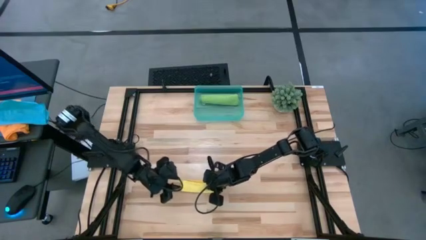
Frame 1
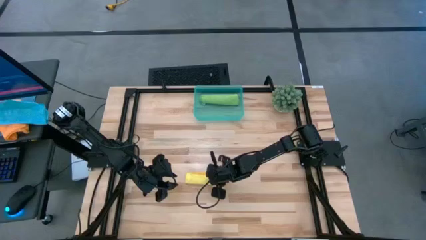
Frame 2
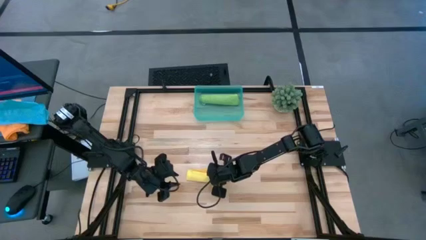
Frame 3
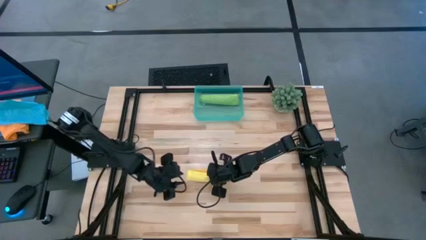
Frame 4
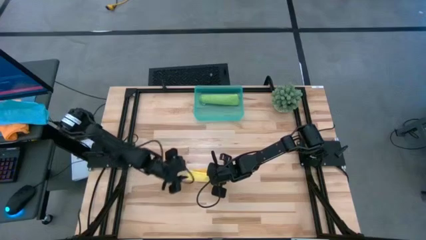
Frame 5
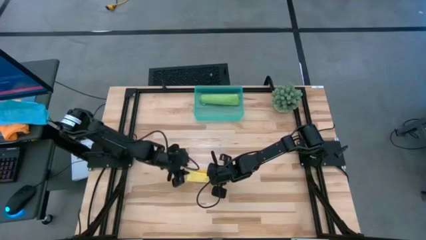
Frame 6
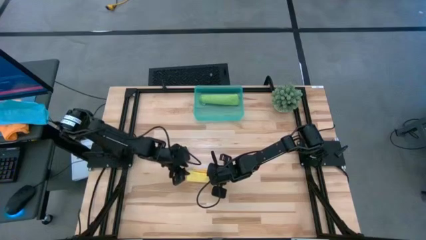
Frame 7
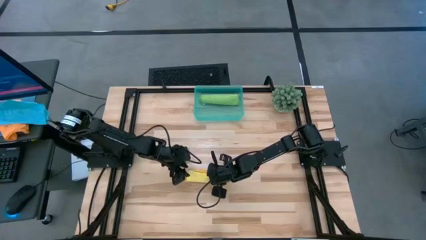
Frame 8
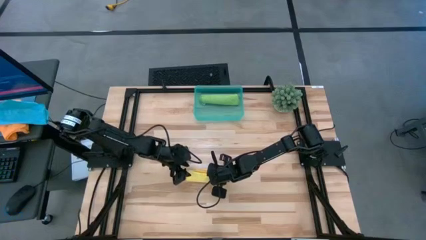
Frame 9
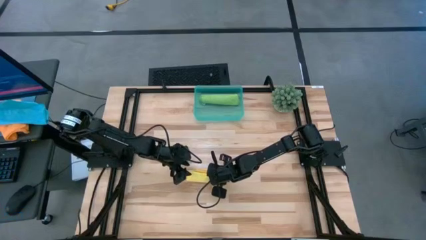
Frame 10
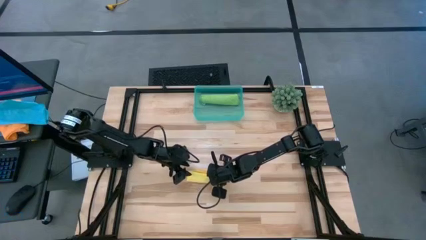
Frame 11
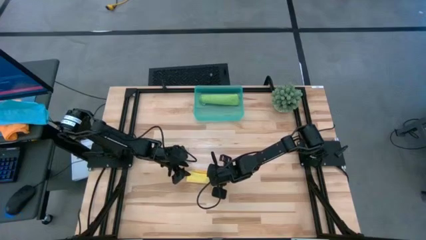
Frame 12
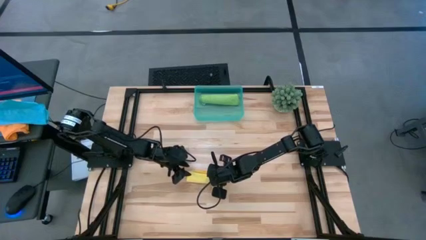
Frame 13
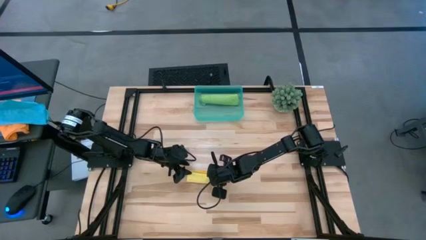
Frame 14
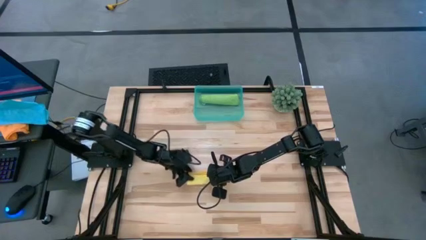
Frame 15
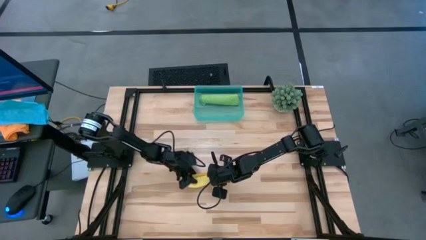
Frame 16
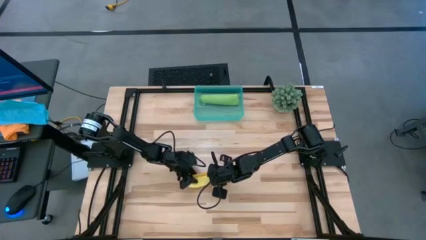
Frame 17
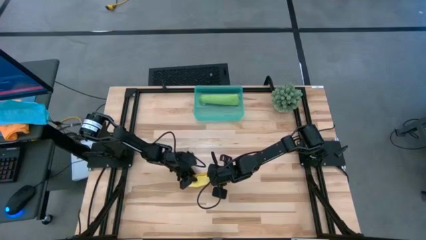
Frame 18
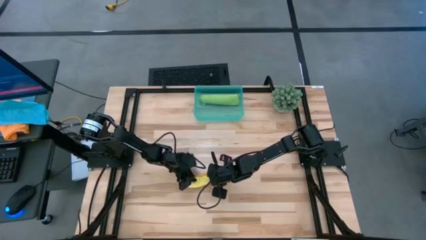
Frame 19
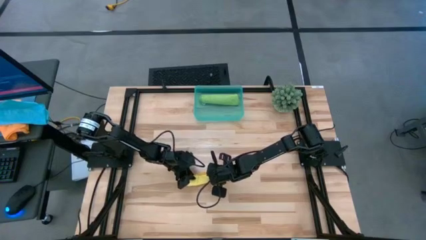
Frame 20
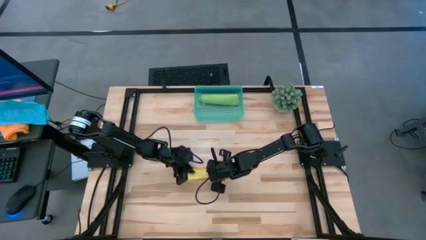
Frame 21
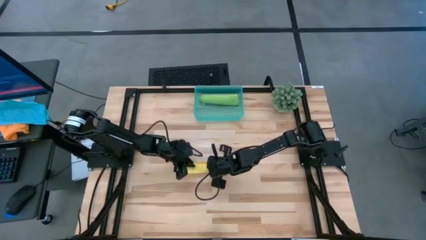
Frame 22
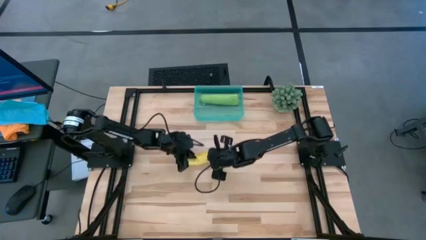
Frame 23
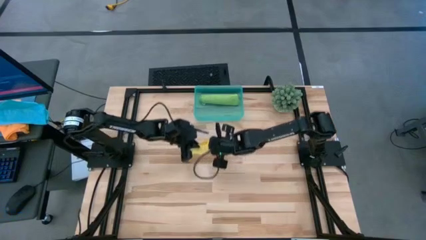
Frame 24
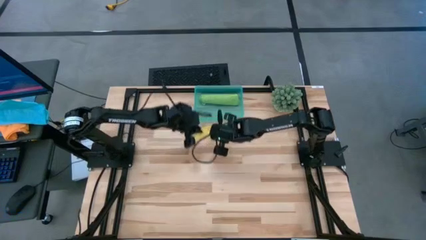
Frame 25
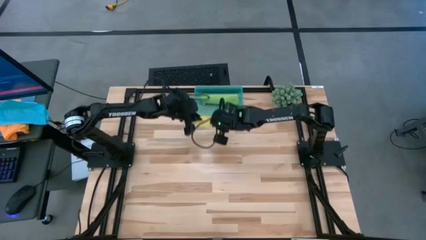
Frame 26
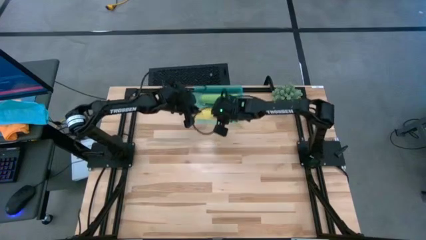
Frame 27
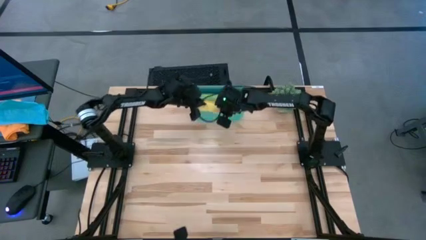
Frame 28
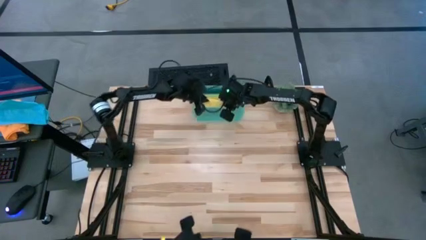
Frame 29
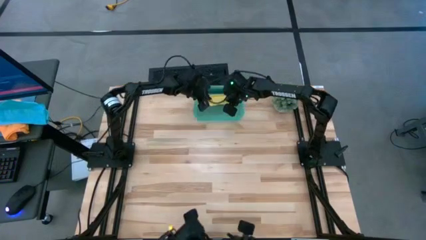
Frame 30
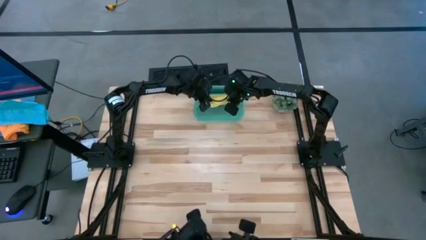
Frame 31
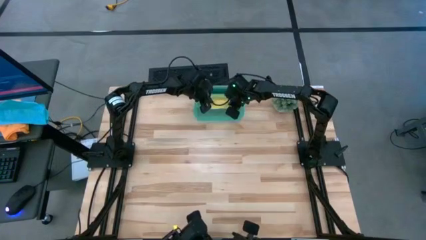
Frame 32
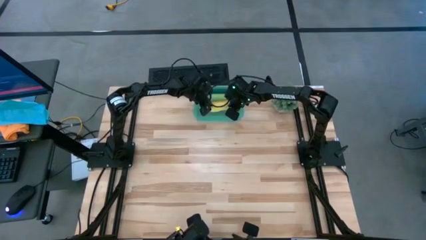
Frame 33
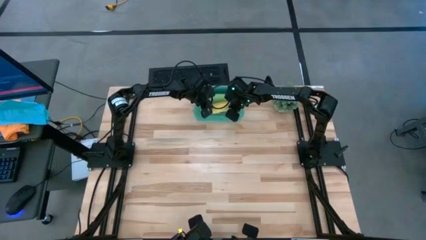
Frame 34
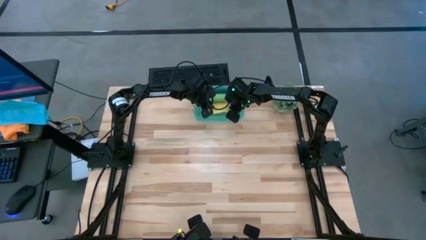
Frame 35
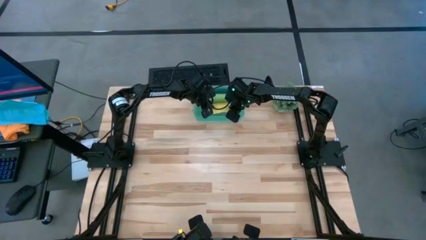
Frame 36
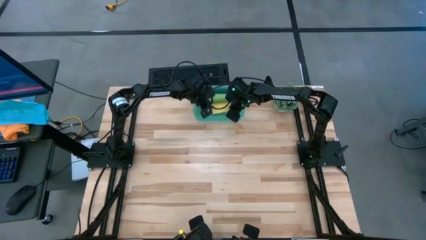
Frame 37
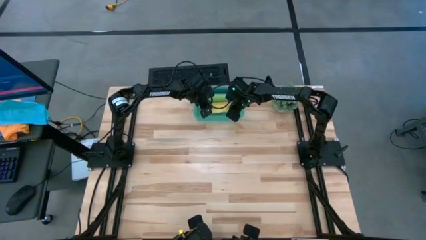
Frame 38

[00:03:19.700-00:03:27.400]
Task: Roll microfiber towels into tight, uniform cylinder then place into a basket
Put the yellow towel into the bin

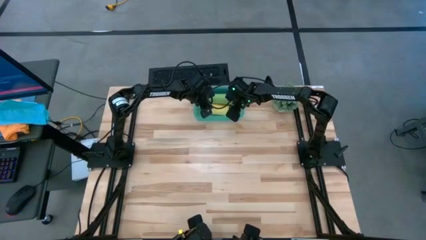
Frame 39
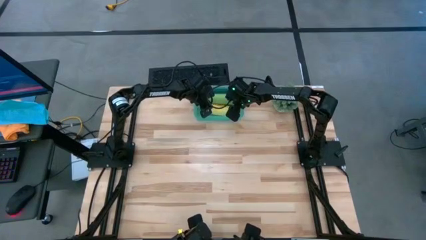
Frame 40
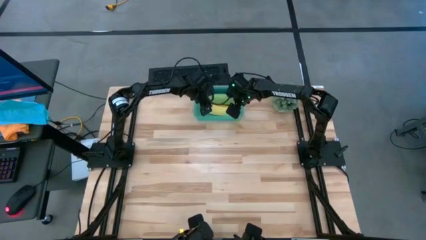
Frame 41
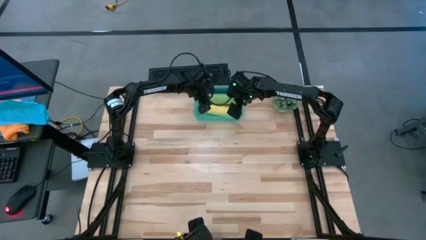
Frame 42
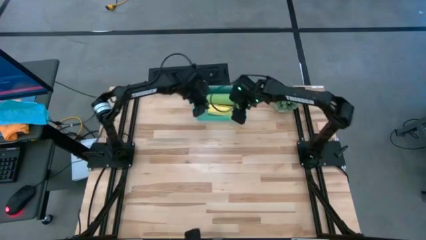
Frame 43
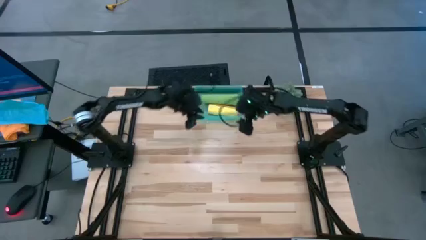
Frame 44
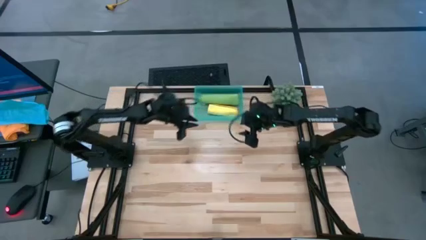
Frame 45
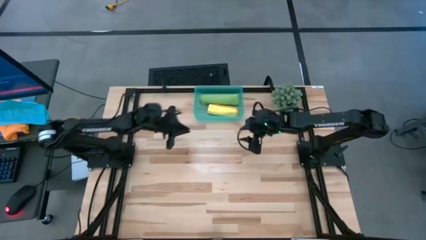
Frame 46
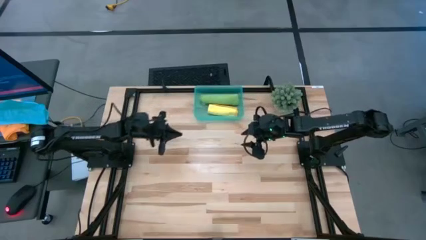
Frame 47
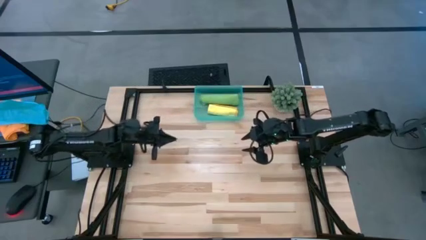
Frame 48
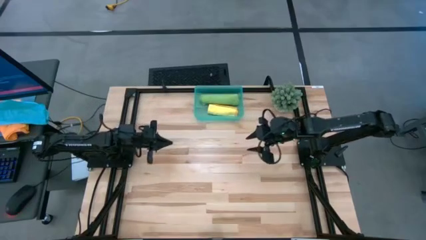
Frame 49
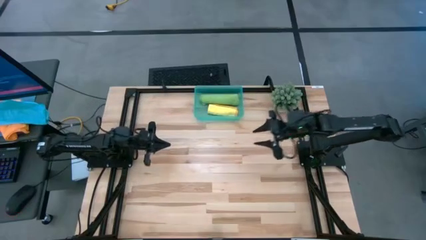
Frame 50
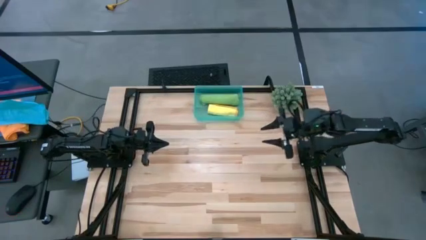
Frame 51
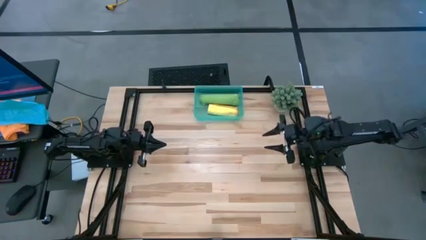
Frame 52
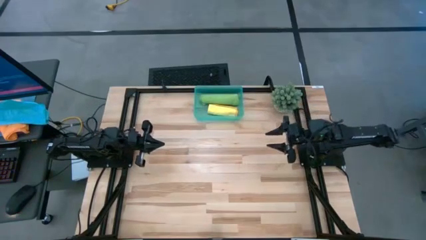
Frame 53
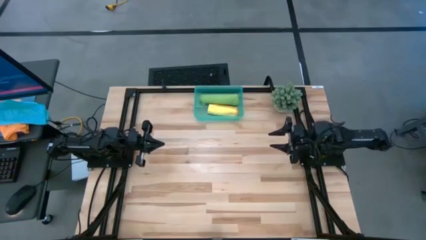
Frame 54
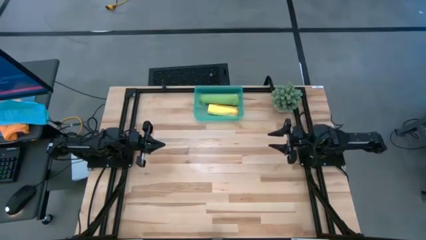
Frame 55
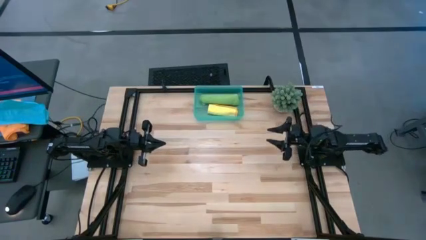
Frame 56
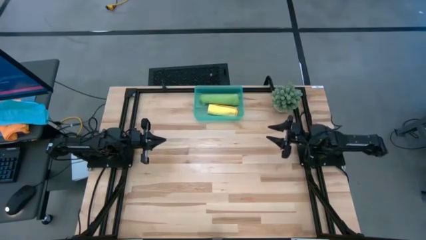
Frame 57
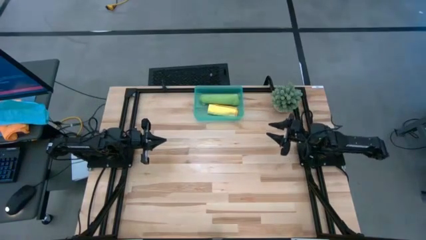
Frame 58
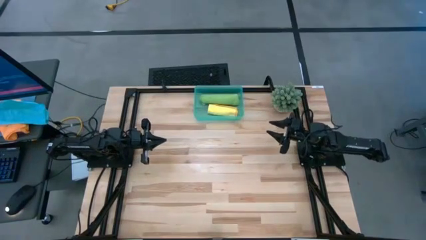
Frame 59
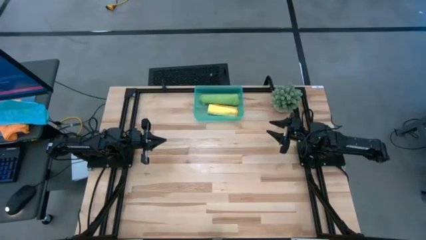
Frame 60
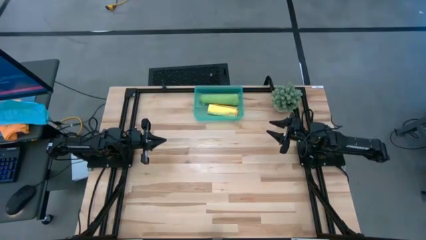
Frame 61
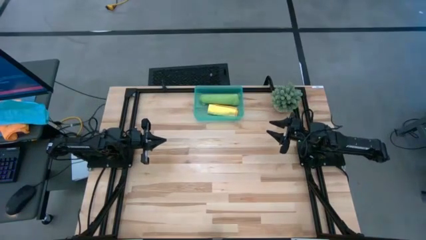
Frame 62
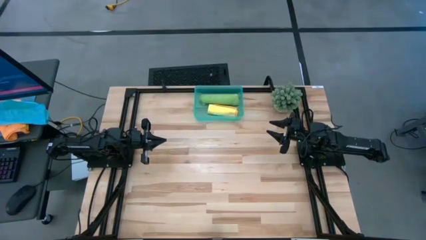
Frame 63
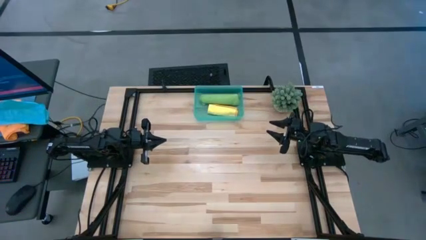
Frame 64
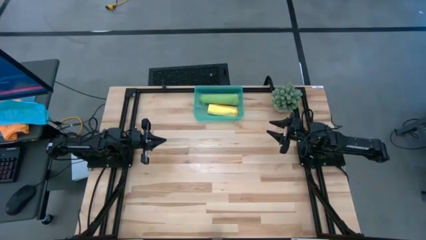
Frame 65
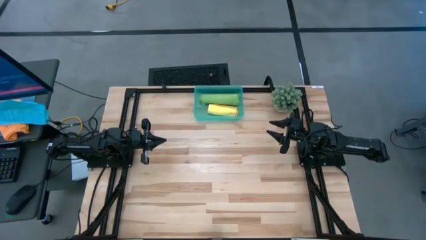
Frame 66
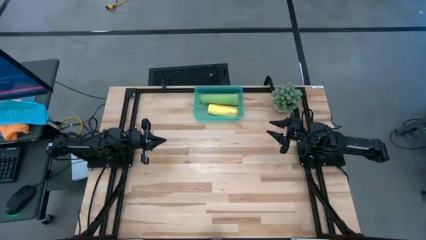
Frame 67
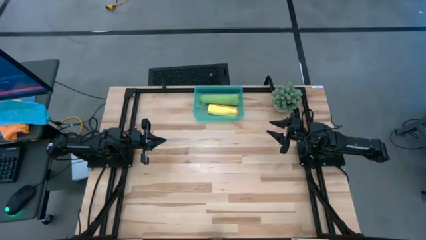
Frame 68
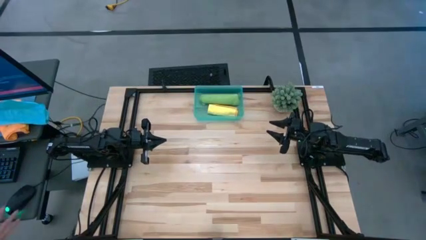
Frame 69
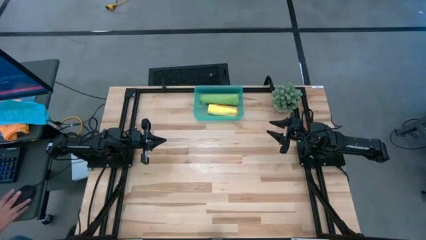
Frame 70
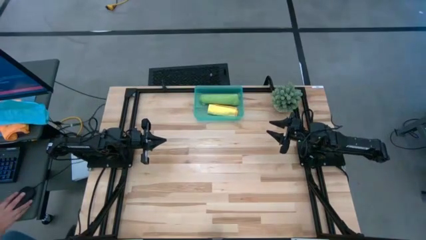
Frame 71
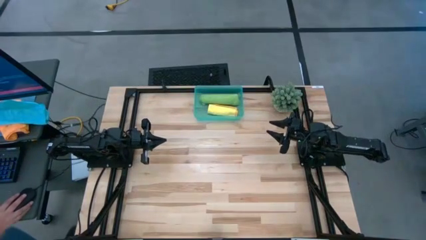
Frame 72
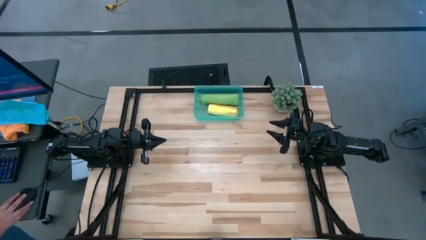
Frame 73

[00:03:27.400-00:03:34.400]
Return to Home Position
